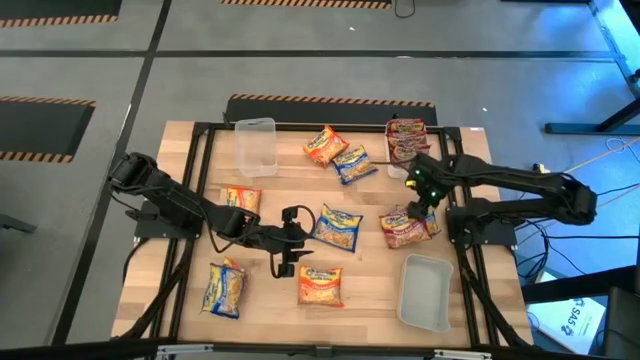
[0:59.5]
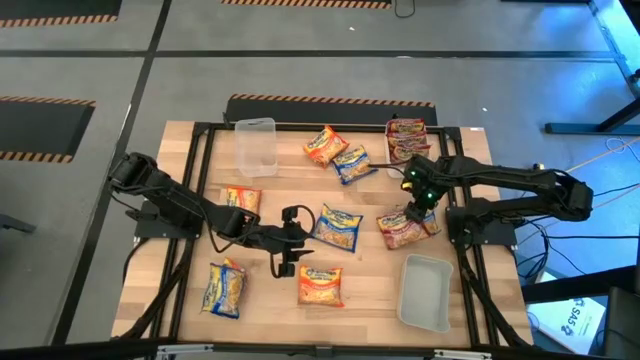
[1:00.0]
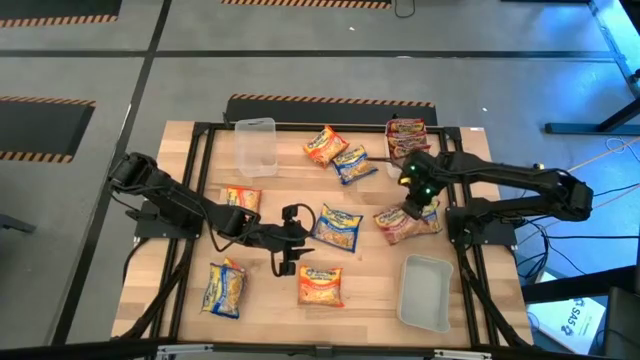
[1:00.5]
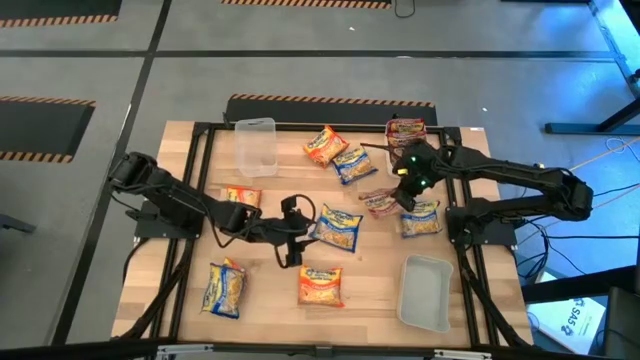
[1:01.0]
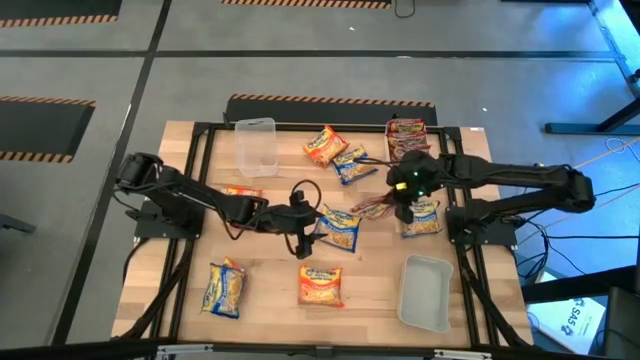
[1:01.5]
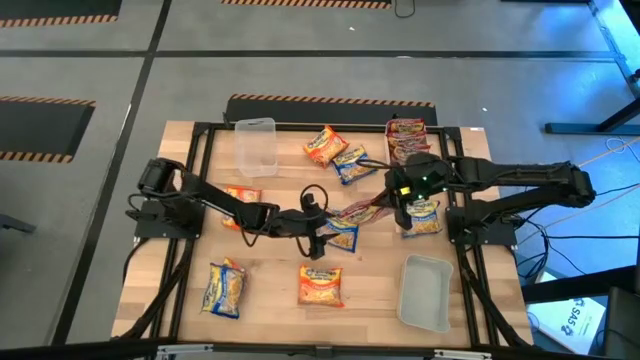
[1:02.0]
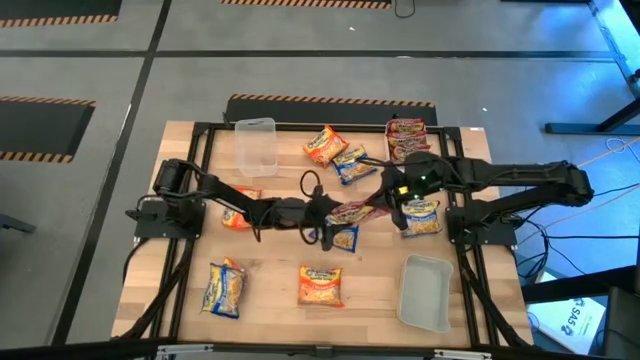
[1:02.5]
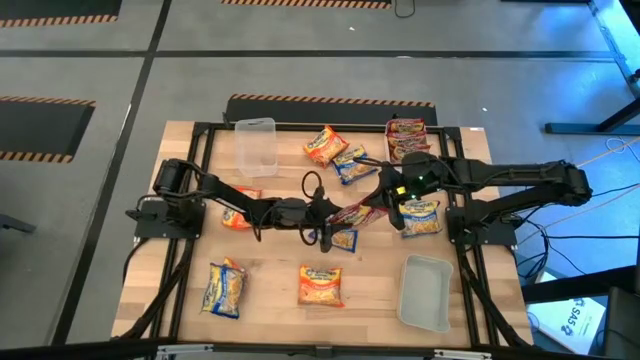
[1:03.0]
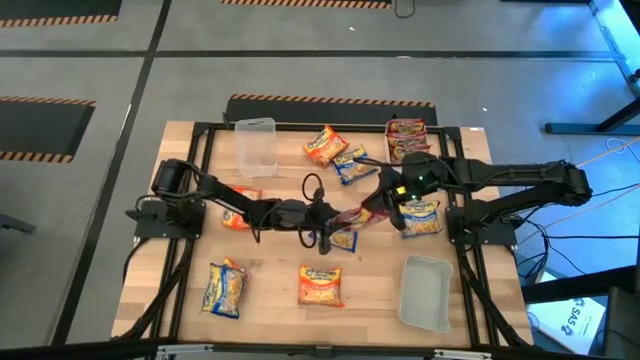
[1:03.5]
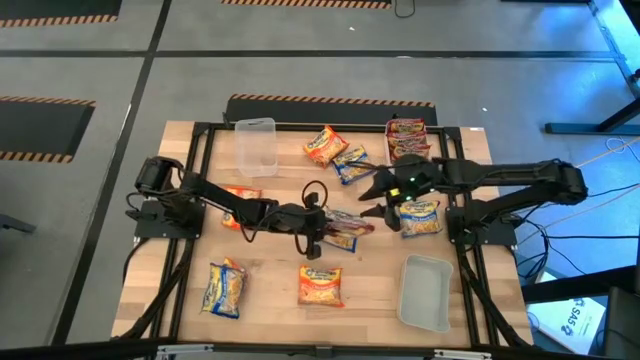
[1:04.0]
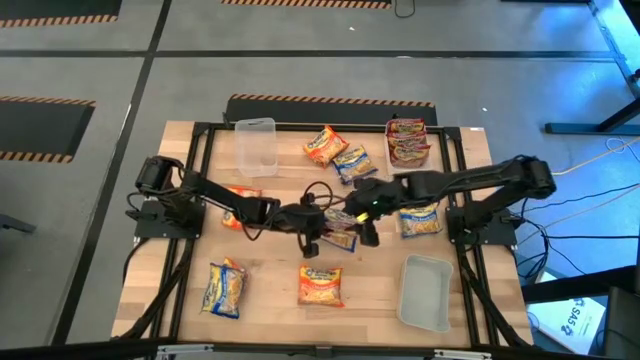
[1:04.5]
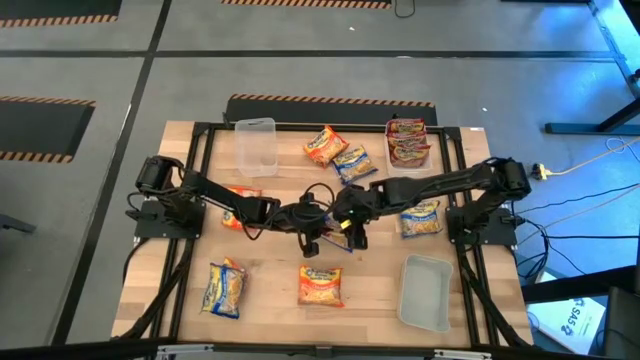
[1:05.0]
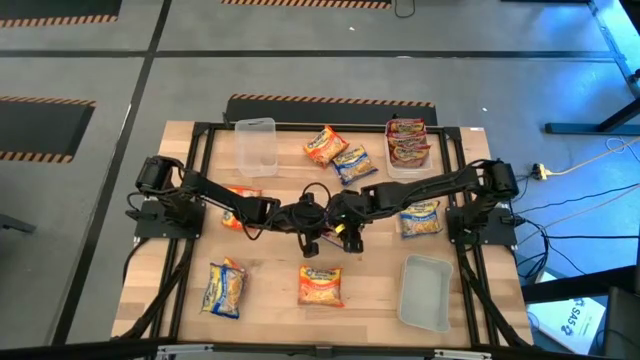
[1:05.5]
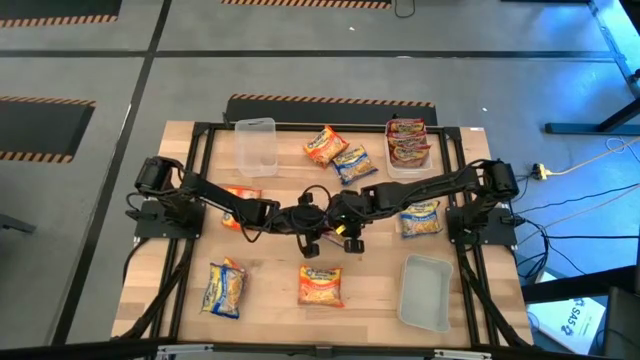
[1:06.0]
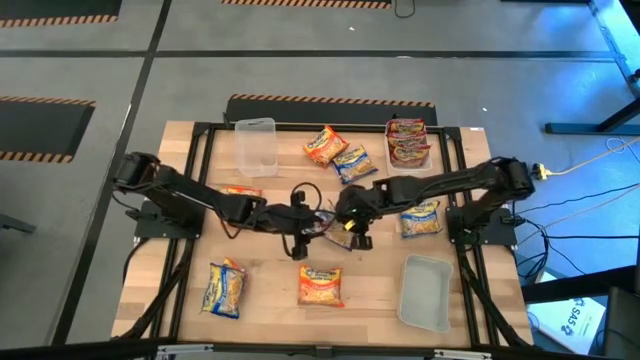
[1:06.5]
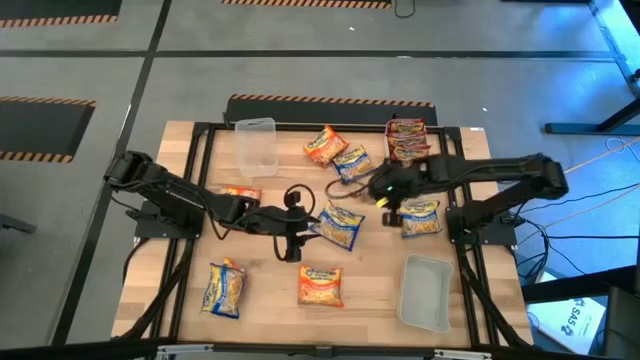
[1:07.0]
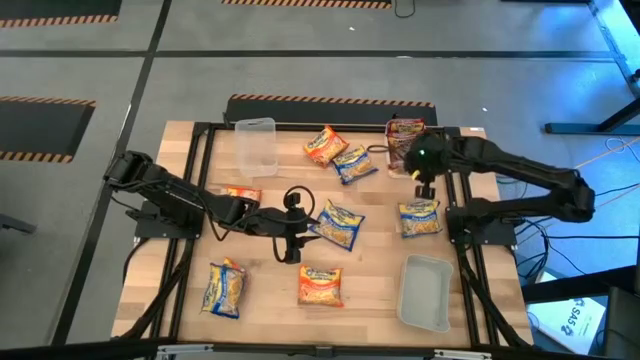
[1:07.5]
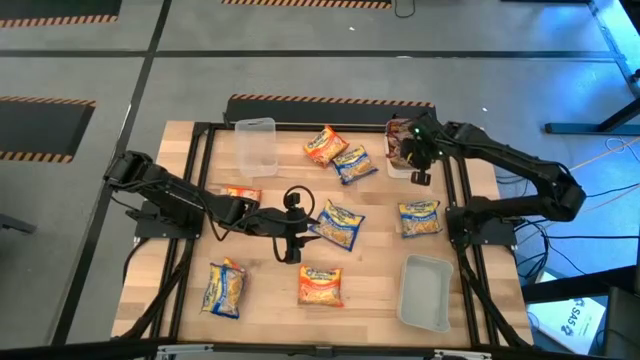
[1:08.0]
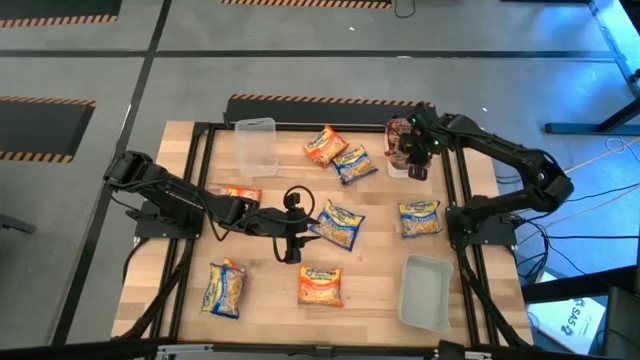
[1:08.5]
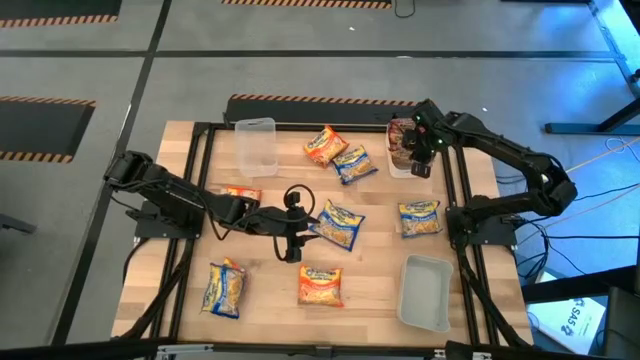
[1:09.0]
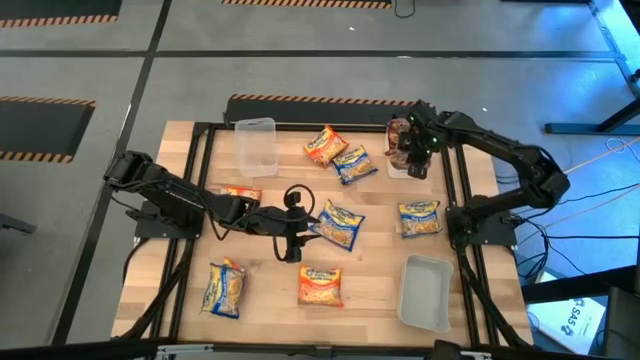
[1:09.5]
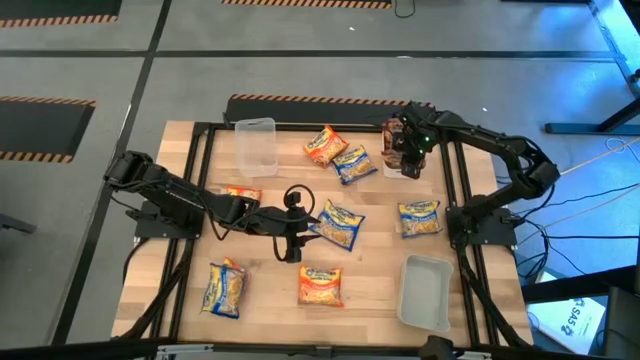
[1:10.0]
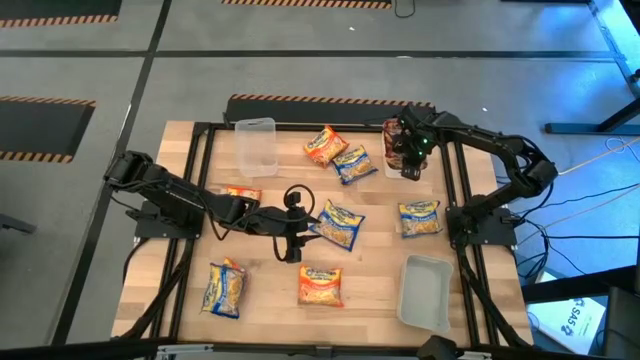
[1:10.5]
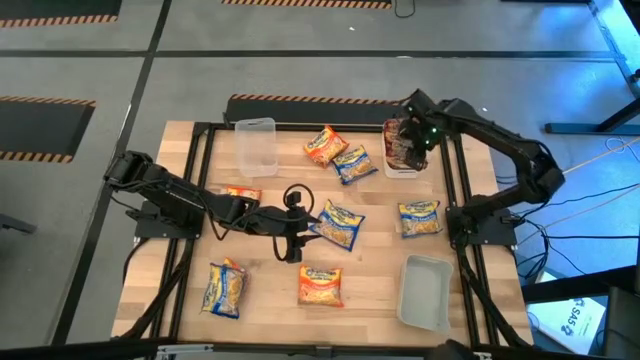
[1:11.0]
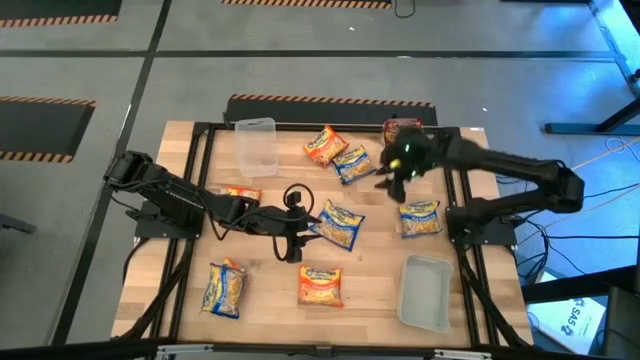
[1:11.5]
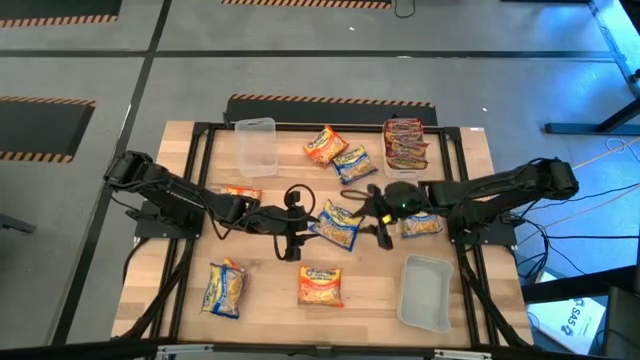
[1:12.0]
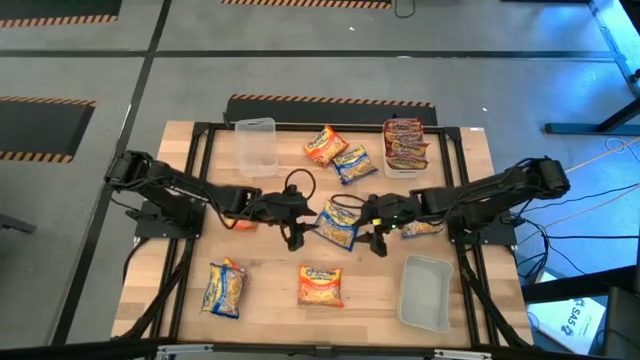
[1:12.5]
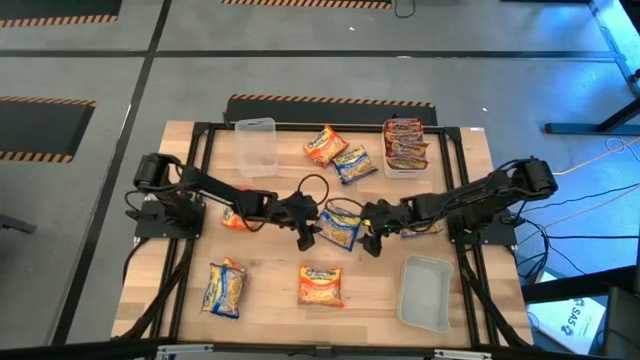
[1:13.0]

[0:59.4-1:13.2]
Task: Sort Maruchan noodles
Put the red noodle pack into the white bin

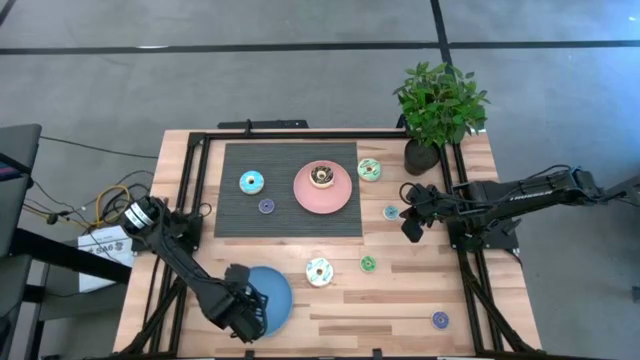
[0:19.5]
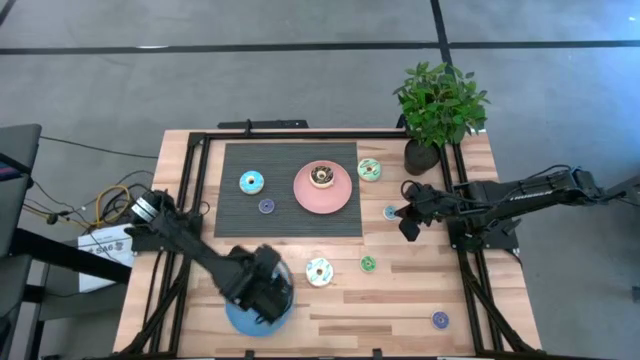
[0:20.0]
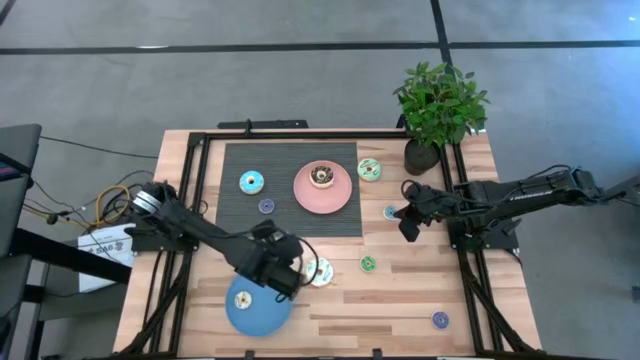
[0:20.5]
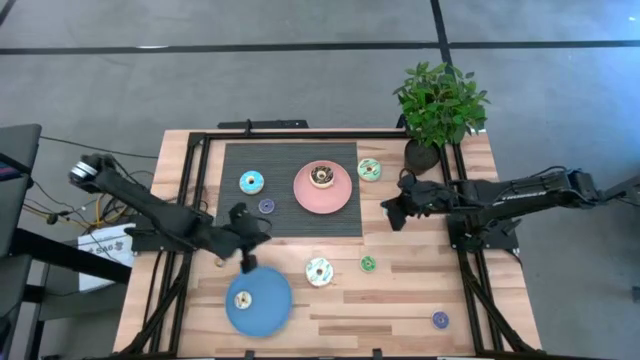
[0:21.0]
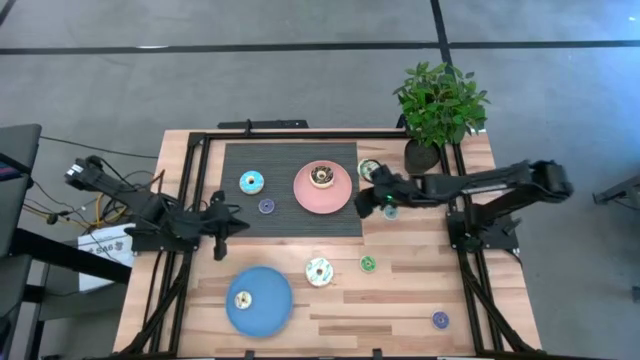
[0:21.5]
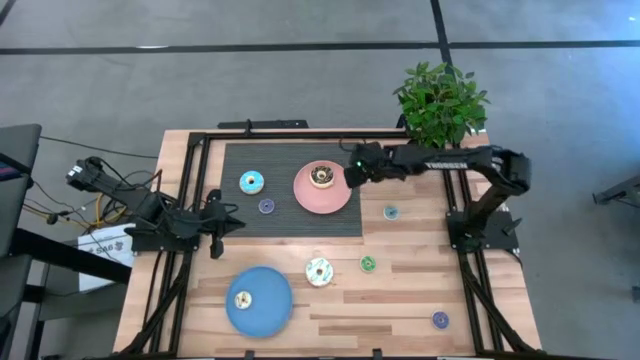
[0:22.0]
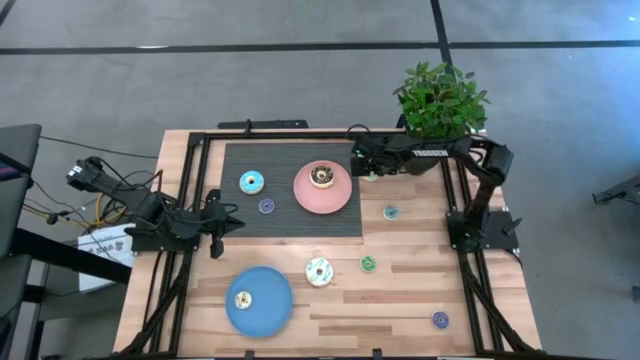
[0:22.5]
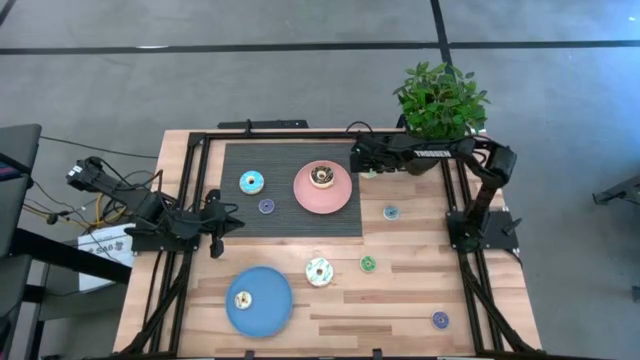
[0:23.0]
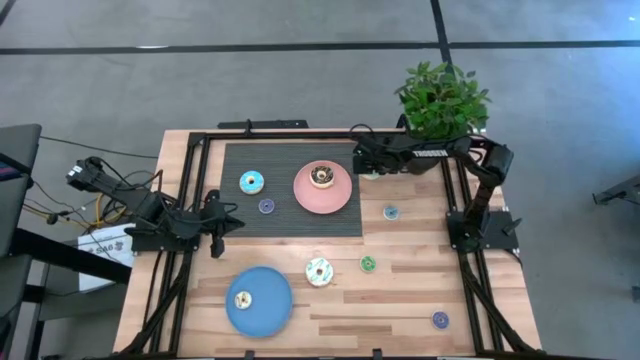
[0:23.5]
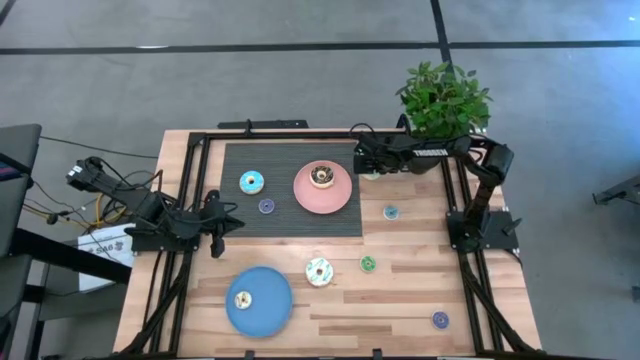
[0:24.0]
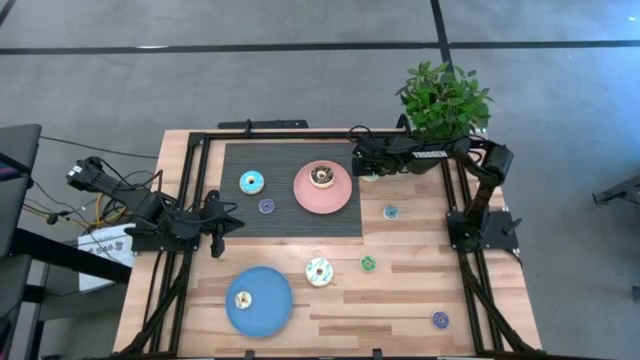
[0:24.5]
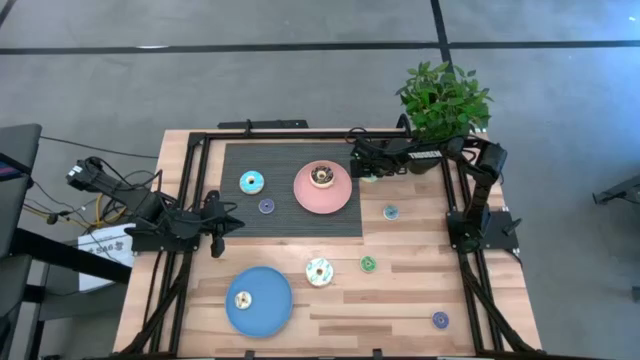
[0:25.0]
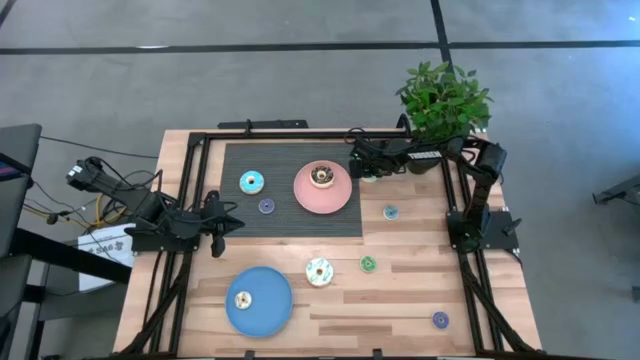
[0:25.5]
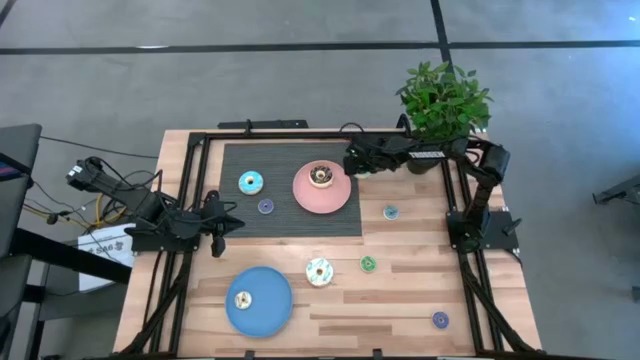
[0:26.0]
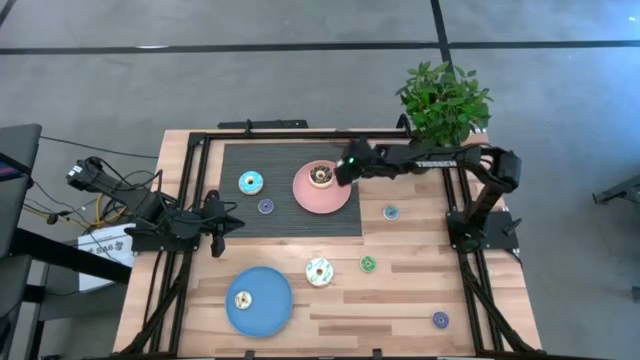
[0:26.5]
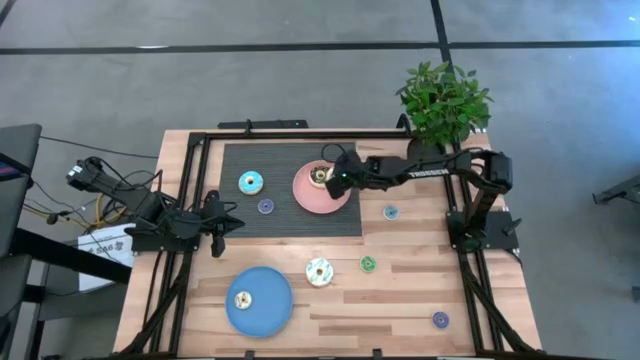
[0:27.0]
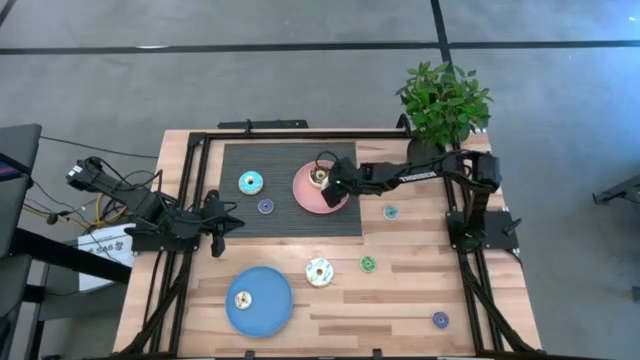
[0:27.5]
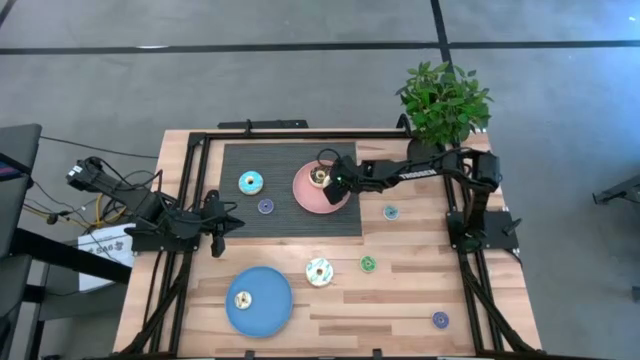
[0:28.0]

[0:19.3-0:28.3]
Task: Pick & Place donuts
Put the large light blue donut on the pink plate
